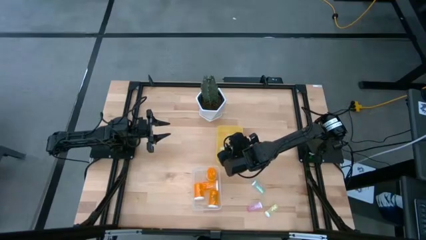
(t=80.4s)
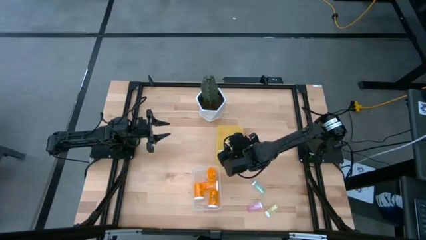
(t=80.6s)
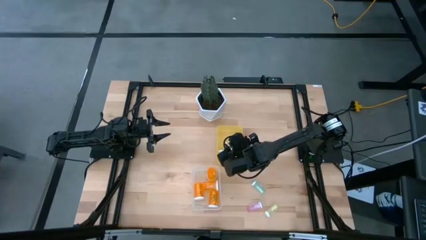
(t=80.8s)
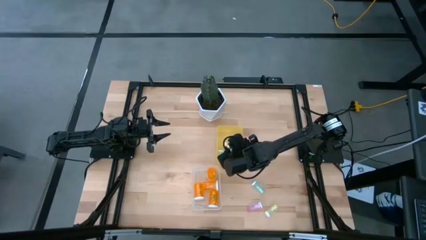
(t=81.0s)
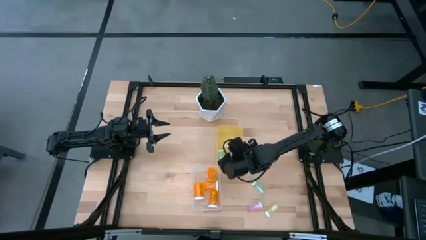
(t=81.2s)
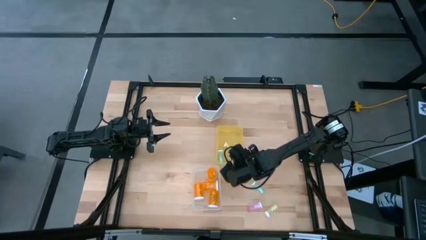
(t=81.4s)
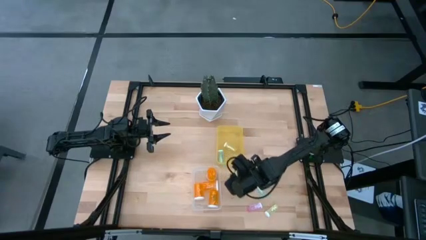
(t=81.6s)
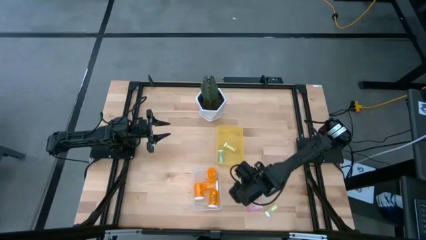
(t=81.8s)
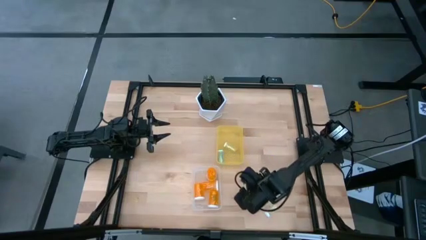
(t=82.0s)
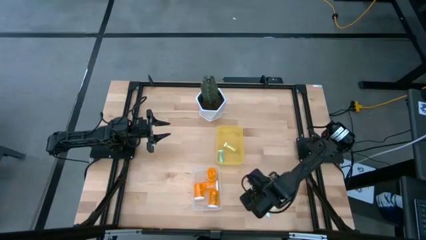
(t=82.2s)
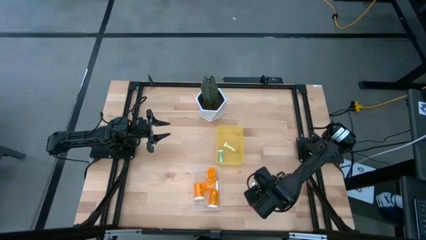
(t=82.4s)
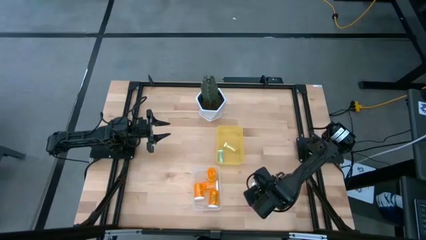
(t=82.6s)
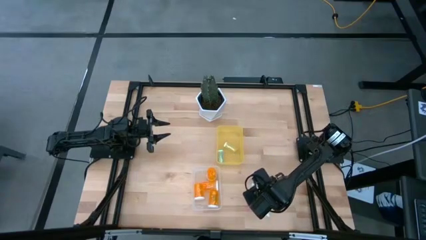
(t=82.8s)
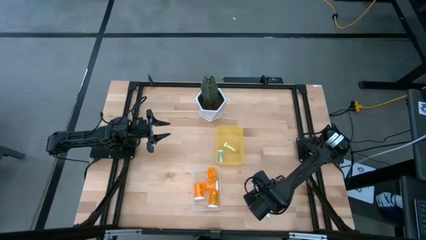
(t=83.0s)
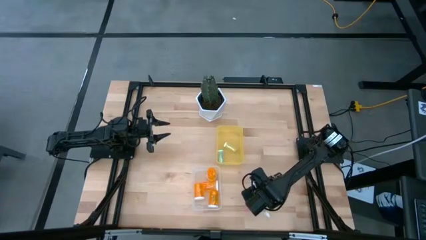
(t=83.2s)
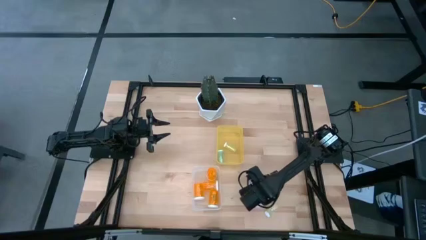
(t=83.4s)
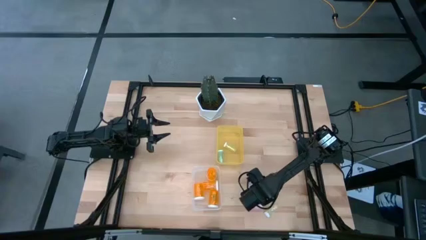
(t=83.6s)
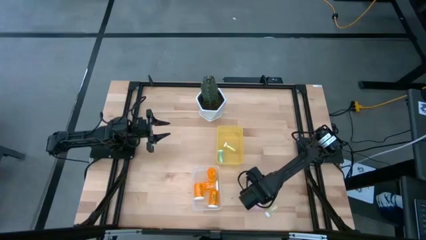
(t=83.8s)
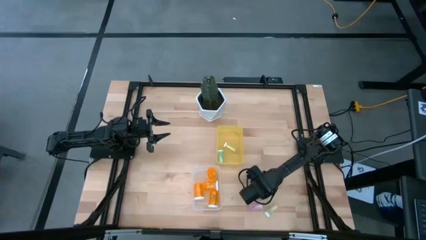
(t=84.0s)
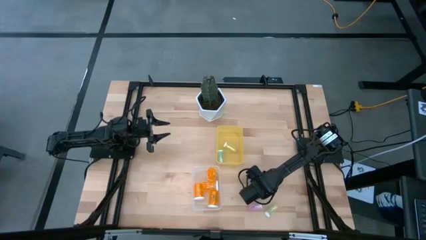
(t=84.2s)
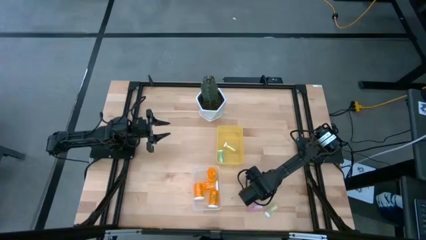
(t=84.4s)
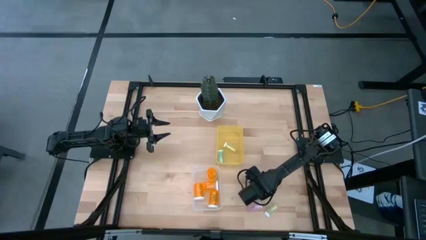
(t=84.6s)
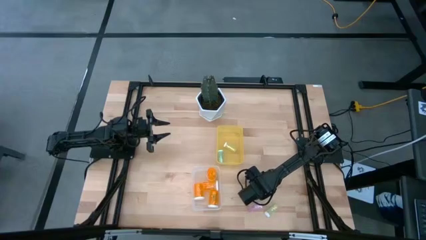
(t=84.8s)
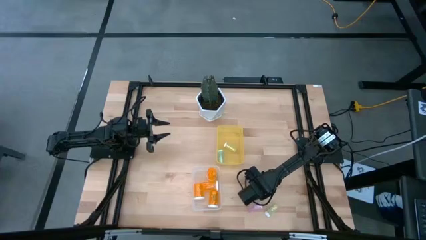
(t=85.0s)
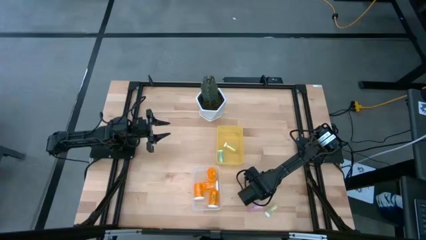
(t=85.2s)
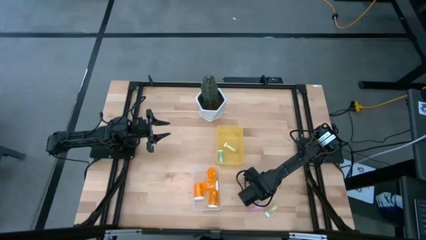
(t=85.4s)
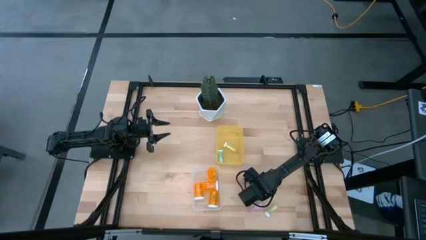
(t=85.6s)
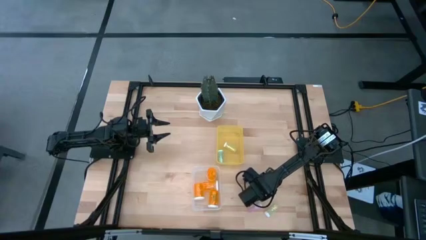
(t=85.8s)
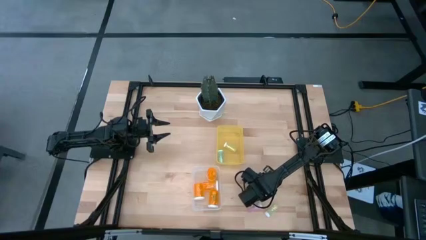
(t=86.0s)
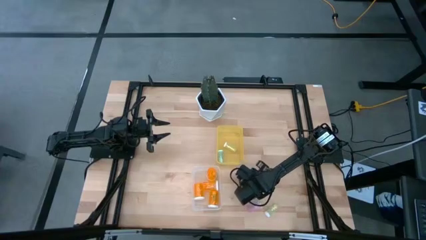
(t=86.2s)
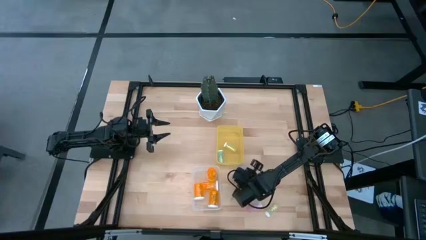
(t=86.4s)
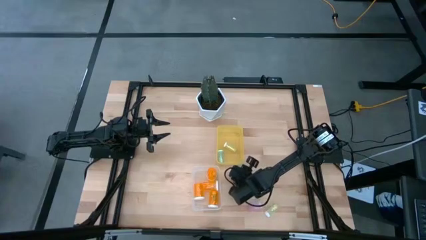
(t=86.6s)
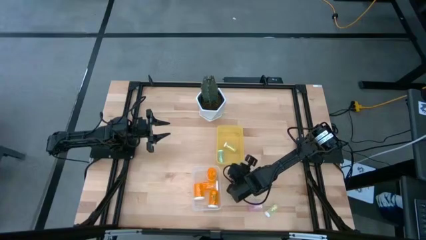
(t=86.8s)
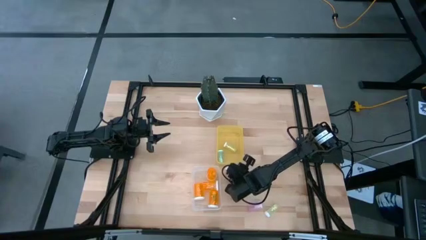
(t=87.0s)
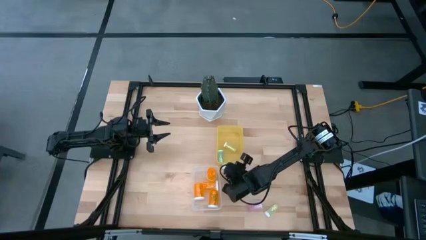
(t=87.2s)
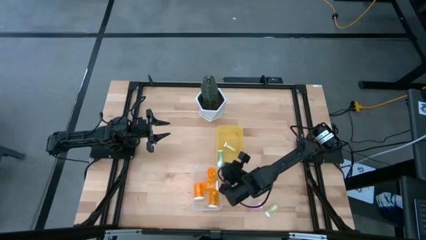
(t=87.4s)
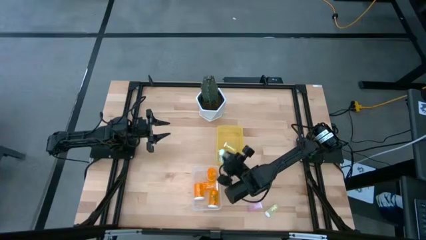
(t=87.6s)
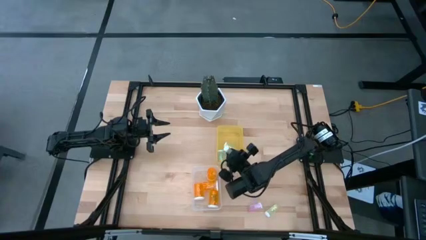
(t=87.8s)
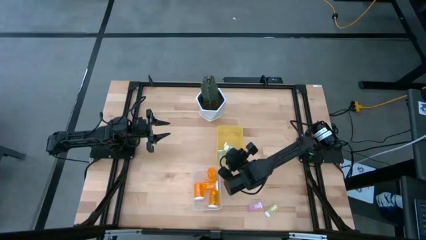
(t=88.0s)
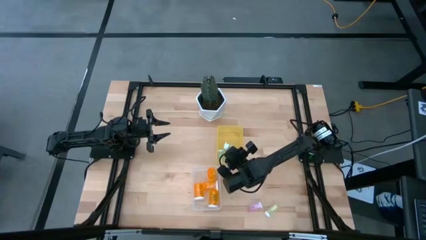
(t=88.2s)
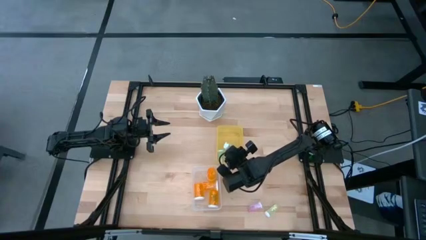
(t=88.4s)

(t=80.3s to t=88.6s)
Task: Pick and place medicine bottles into bin by pill shape (circle, oval)
Put the small blue pill bottle into the small yellow bin

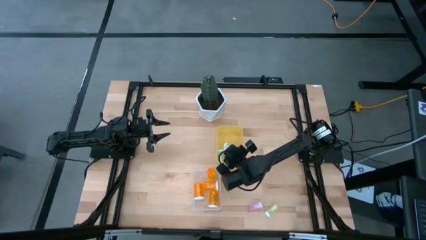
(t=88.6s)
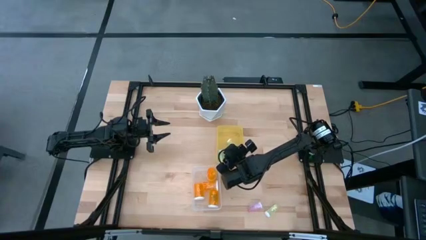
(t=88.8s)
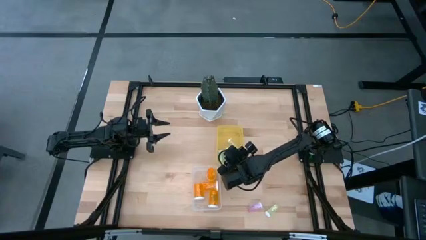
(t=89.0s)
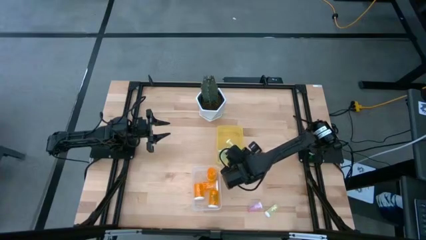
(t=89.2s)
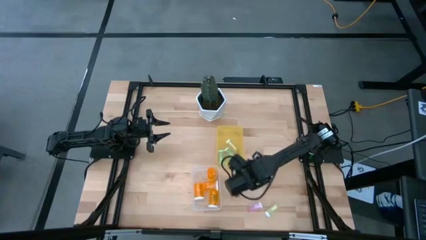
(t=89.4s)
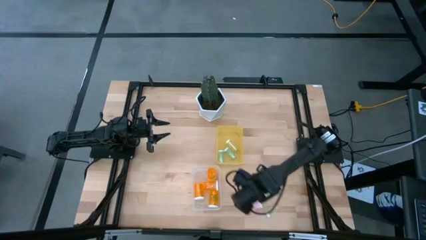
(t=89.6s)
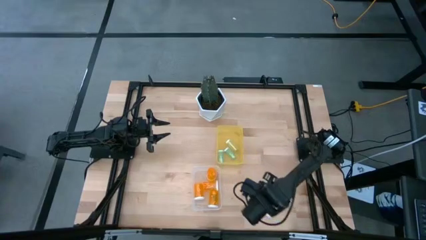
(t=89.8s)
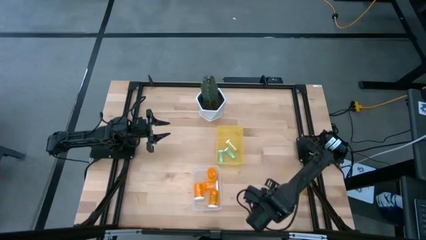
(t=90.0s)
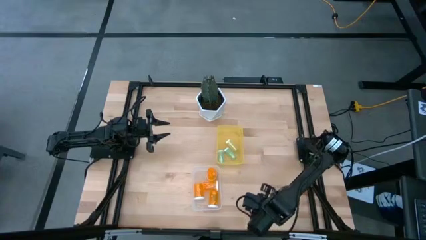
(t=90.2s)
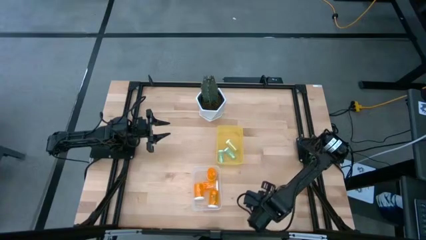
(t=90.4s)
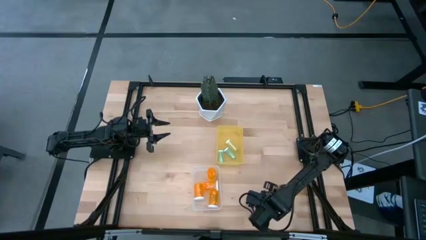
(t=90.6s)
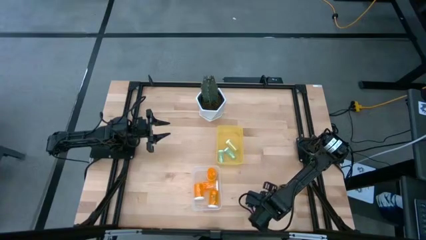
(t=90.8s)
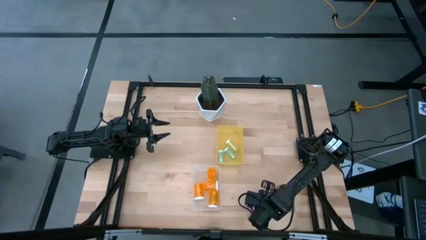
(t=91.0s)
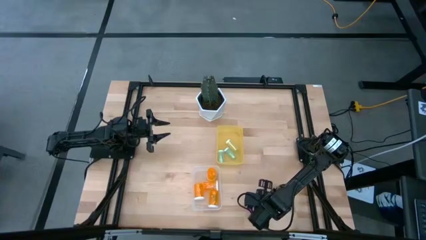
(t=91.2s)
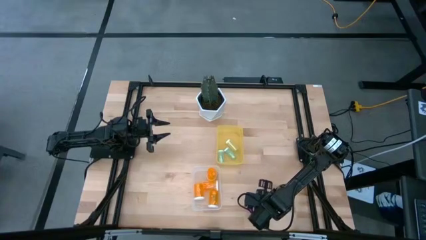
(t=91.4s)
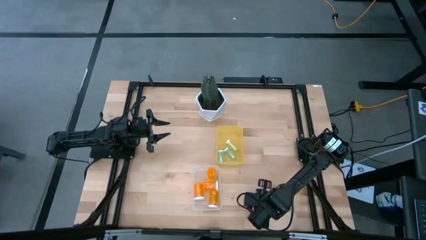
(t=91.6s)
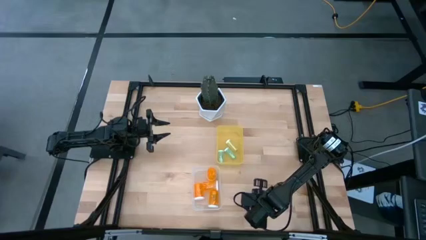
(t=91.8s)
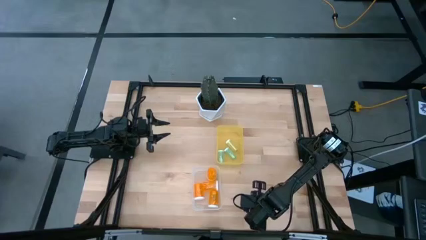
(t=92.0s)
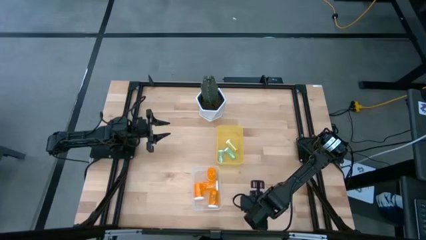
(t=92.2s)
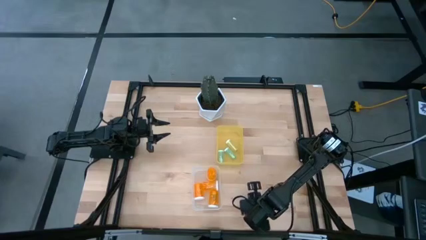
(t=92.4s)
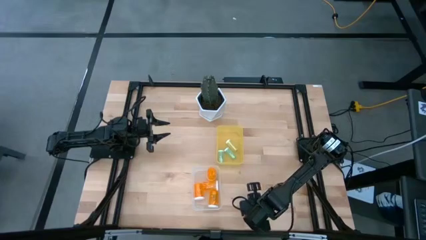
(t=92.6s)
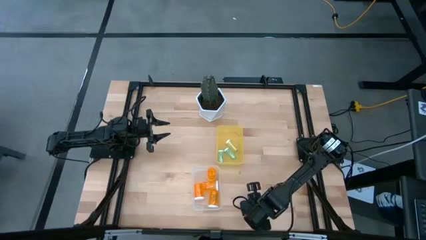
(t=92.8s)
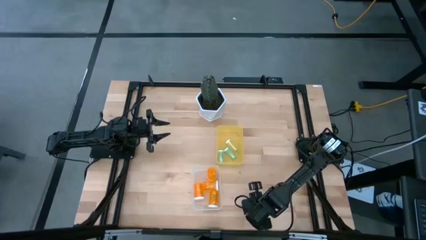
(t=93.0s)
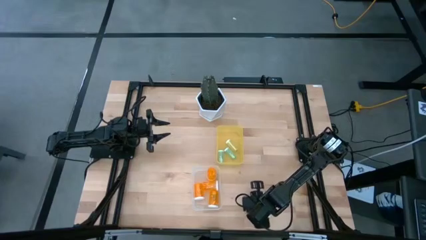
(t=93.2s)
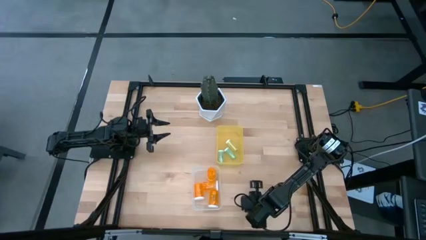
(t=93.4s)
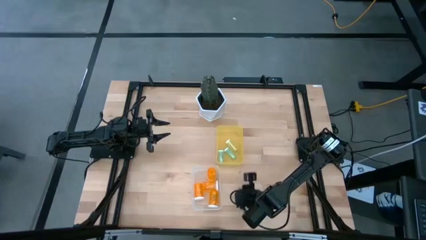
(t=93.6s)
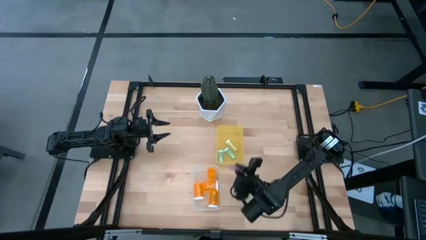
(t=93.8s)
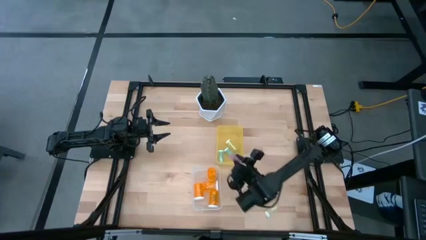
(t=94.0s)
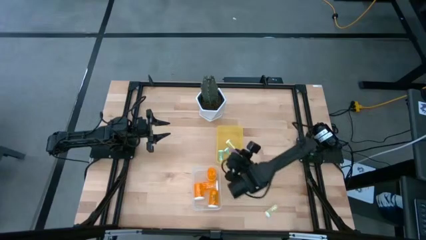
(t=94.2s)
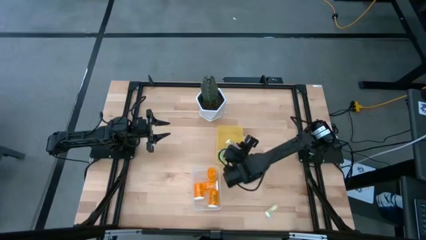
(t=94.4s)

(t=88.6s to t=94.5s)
Put the small pink pill bottle into the small yellow bin

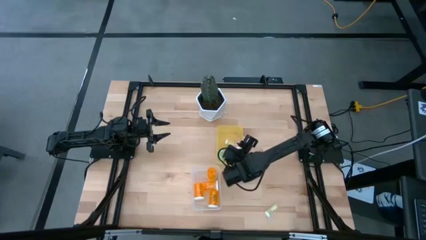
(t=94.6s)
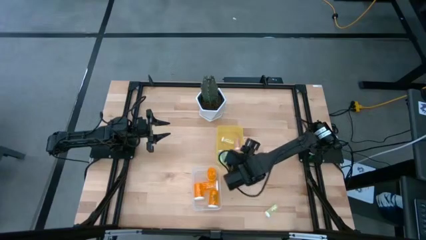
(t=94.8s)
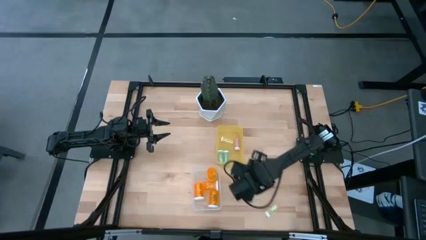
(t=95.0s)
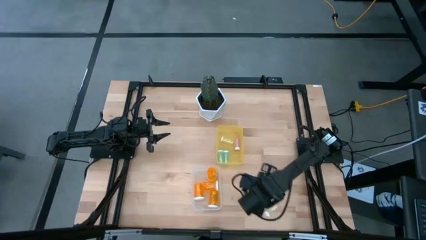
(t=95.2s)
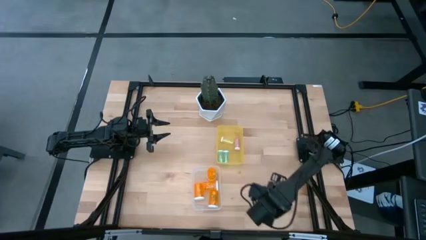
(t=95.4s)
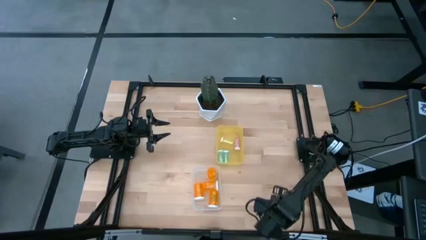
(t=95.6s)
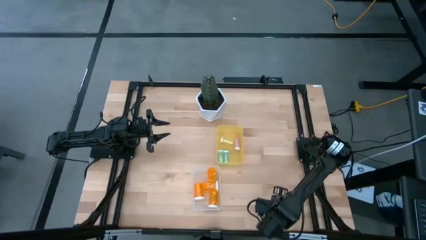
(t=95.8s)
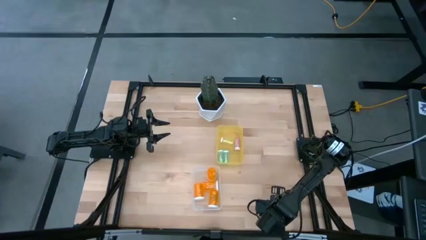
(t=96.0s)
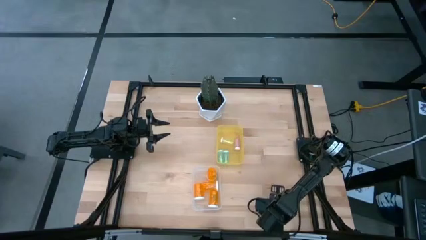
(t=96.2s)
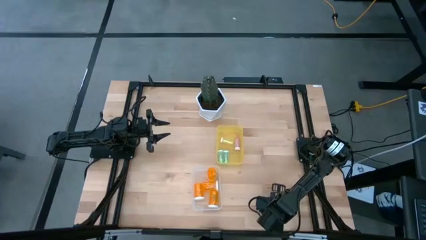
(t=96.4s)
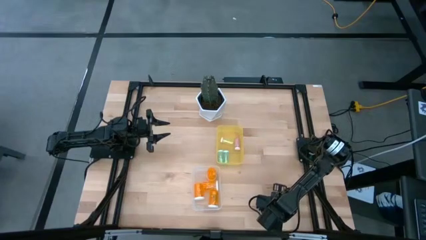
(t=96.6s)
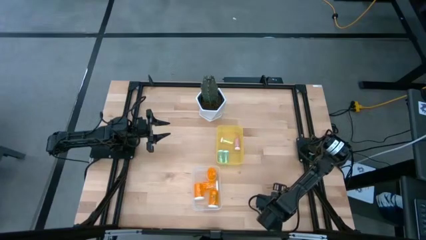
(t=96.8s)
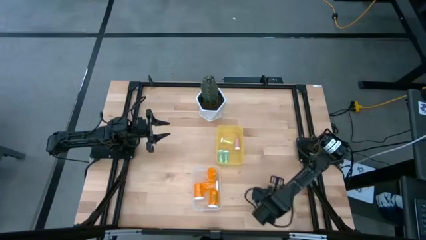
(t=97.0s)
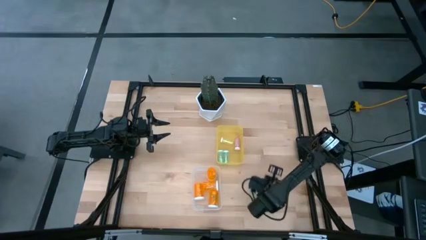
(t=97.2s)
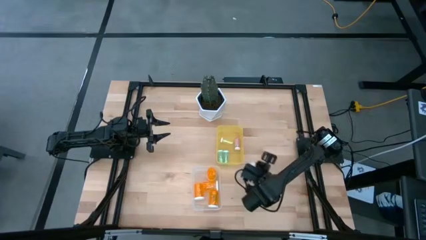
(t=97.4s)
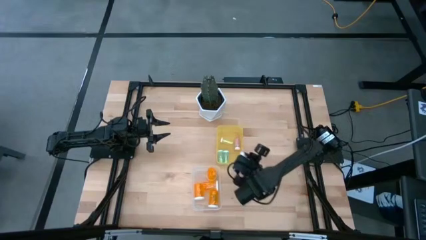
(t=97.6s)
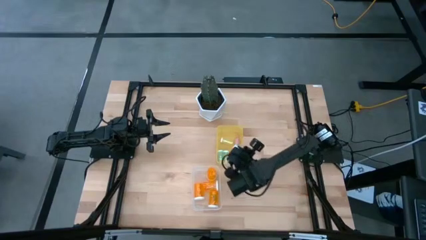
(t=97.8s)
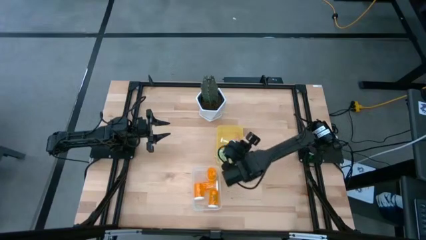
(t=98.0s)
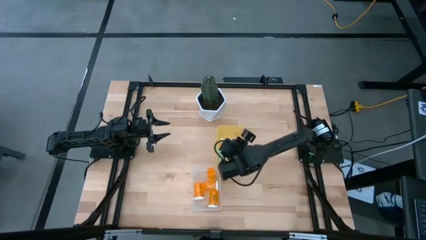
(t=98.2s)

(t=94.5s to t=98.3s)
Put the small yellow pill bottle into the small yellow bin
